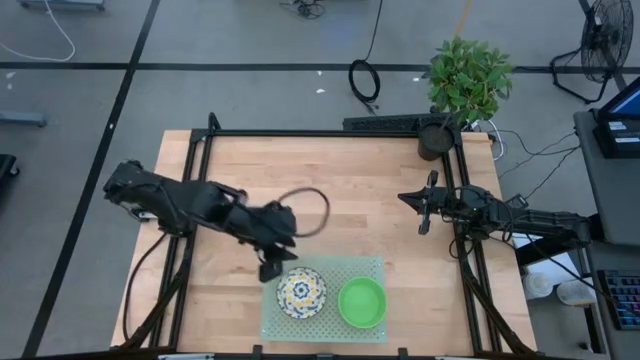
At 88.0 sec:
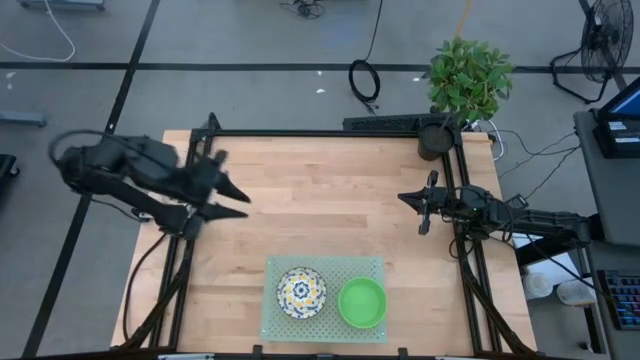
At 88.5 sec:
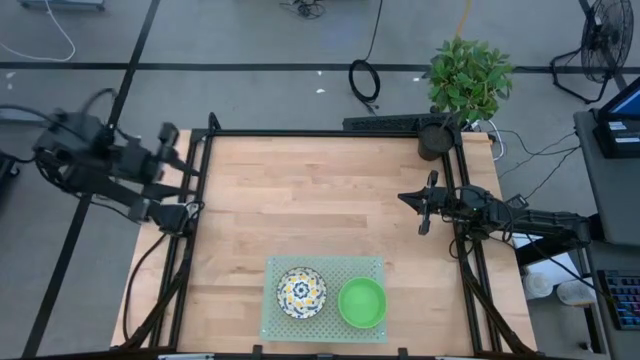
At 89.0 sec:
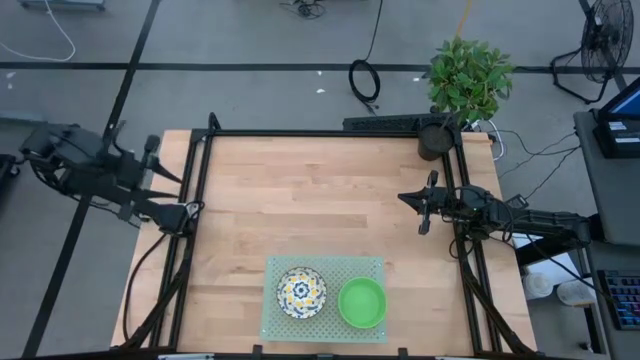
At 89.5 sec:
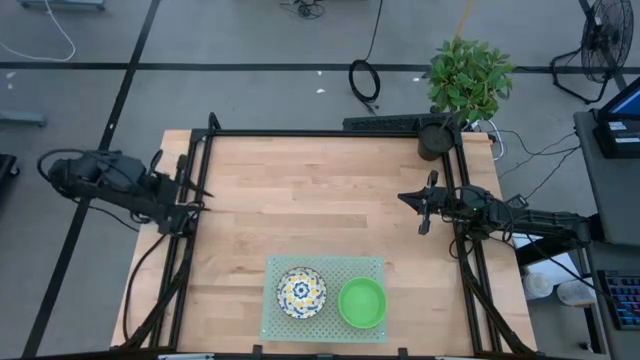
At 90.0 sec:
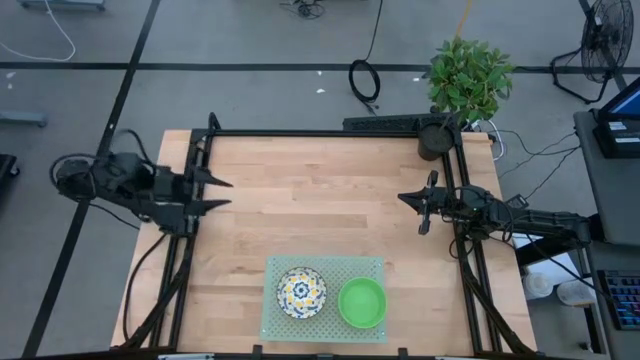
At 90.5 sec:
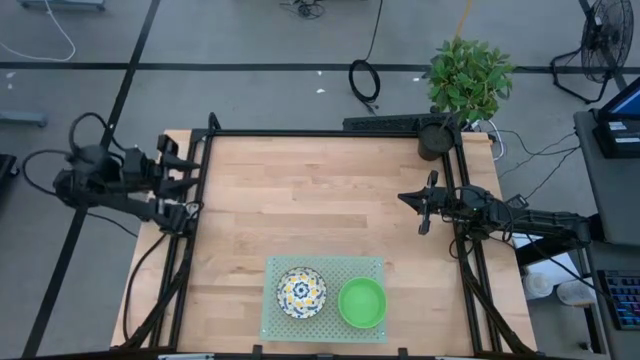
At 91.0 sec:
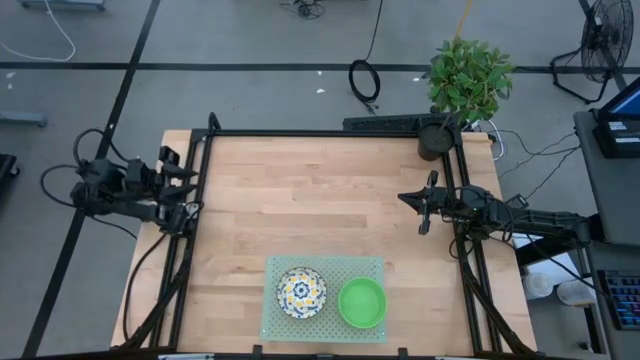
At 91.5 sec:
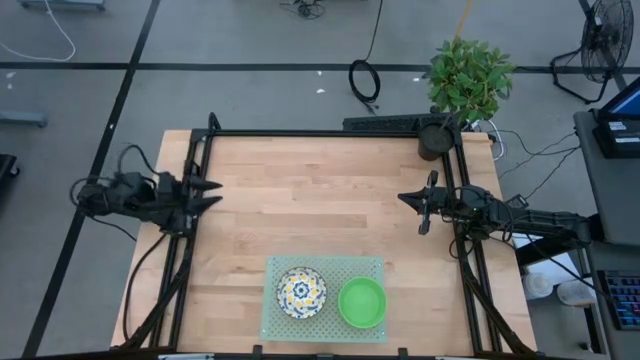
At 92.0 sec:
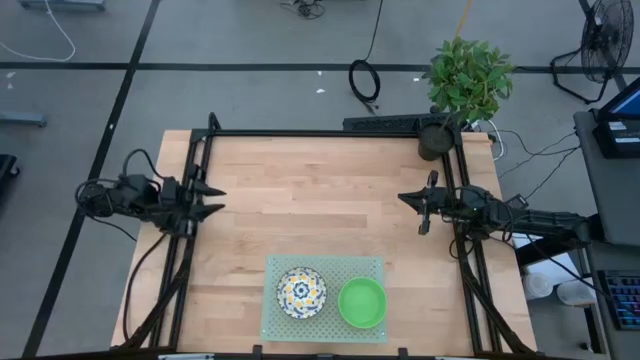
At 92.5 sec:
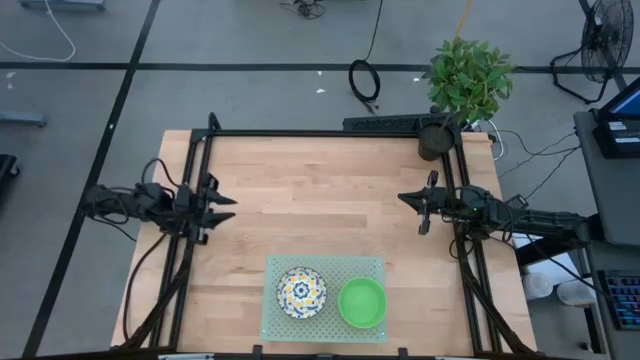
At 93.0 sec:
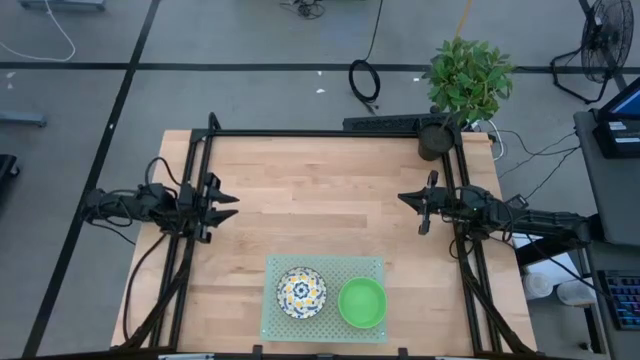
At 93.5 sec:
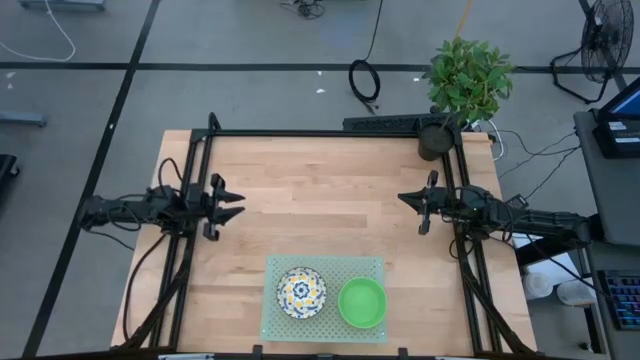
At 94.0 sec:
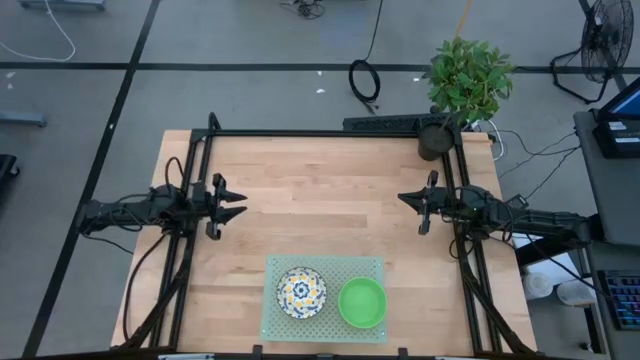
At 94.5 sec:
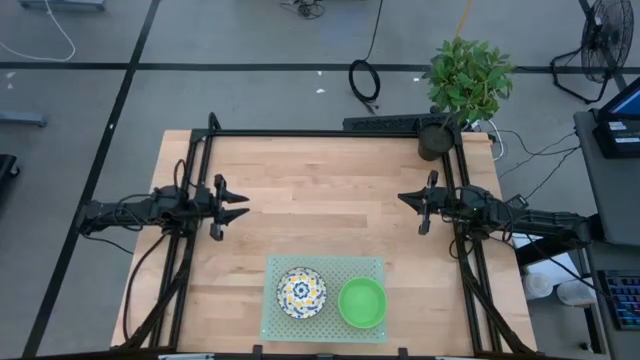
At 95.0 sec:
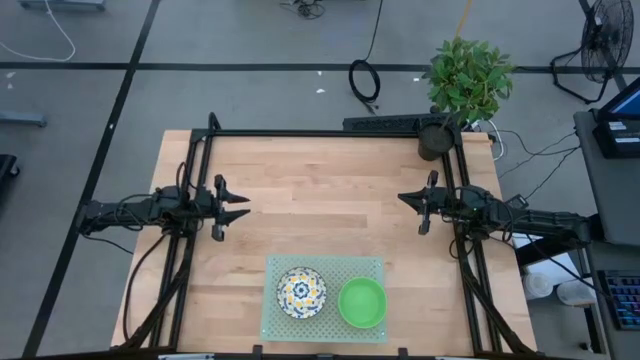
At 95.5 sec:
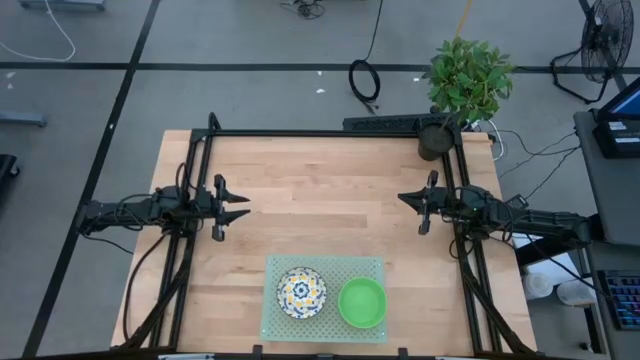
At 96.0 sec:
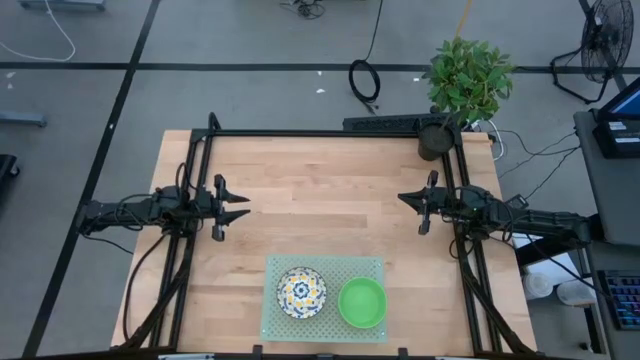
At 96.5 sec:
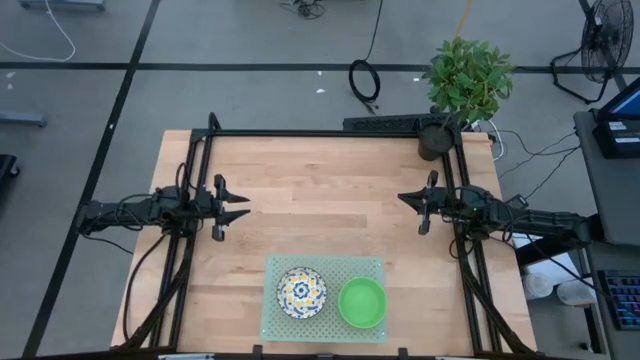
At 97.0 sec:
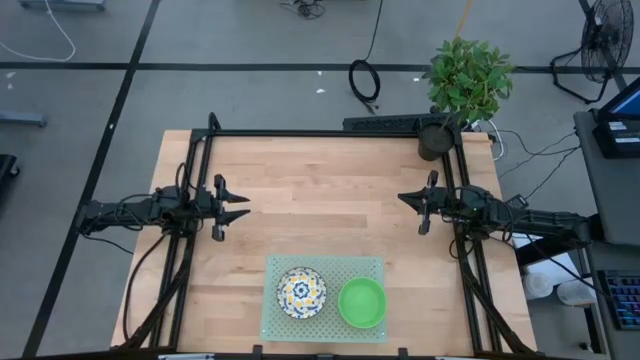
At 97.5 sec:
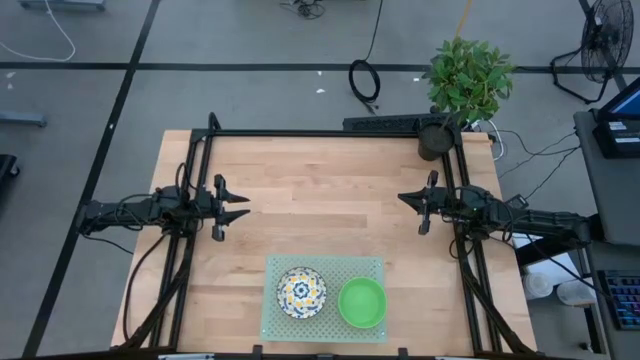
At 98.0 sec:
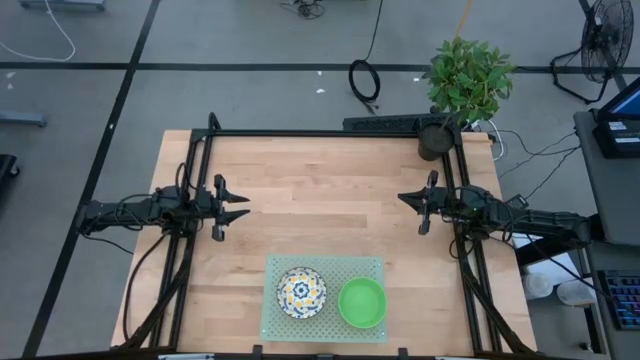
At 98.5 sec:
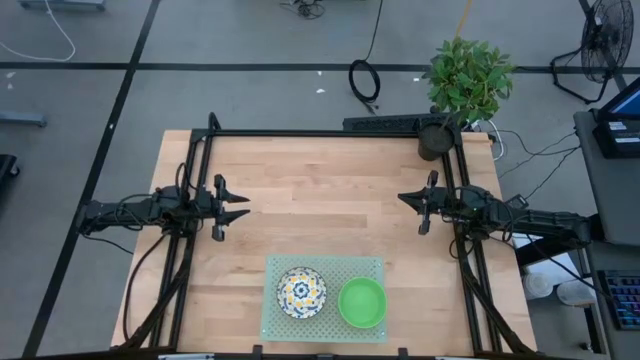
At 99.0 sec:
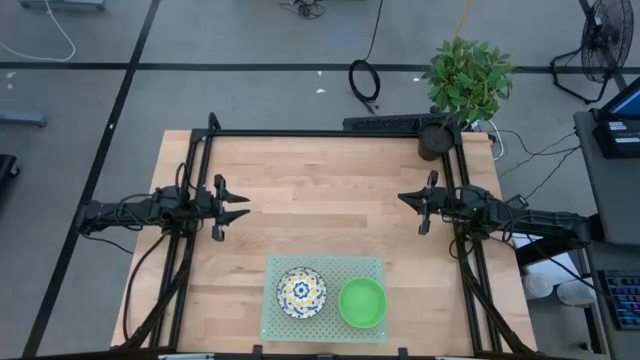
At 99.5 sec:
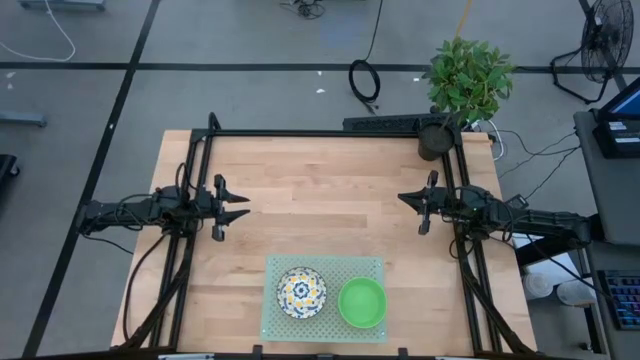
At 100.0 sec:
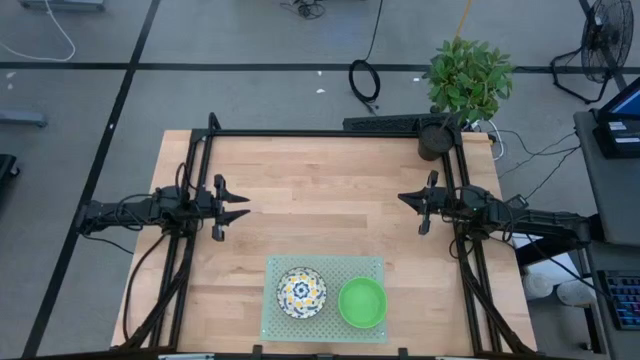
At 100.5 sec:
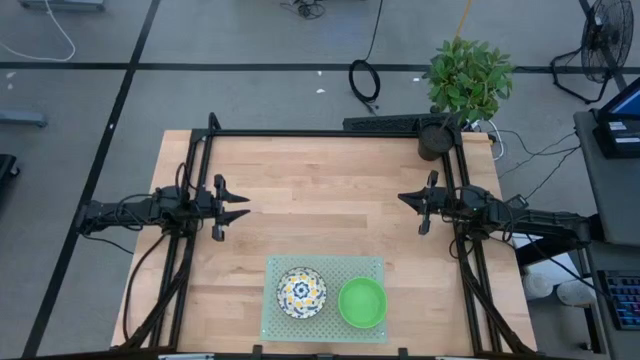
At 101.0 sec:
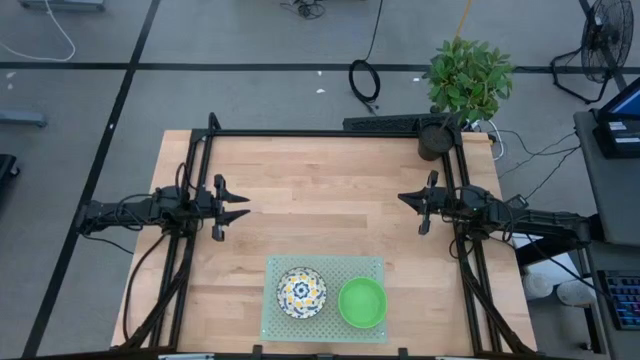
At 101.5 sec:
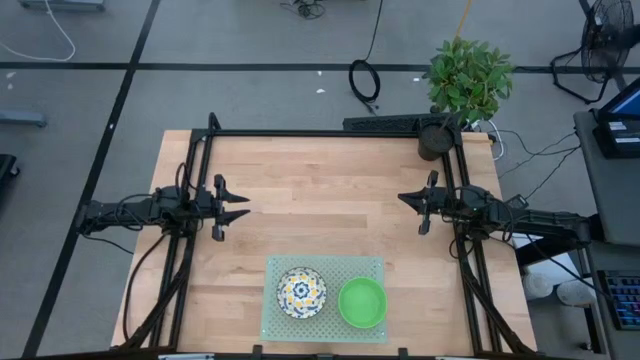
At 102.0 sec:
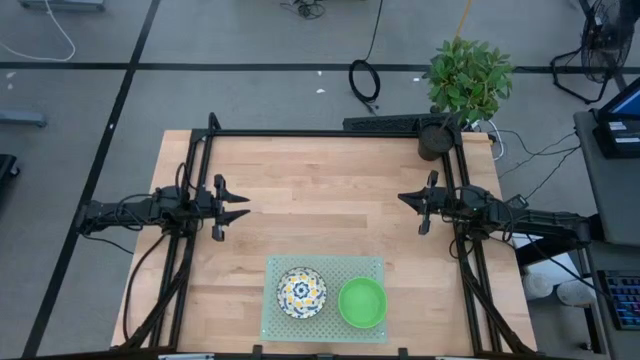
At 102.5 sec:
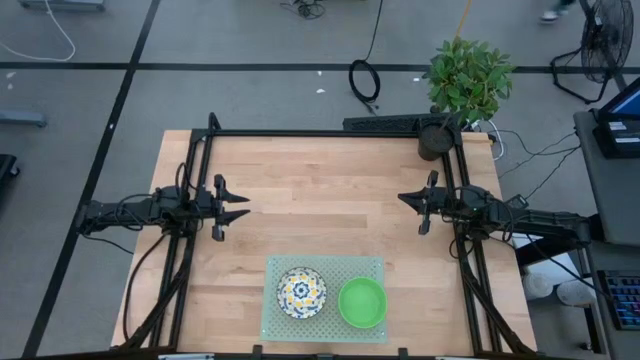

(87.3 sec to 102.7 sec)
Task: Pick & Place Mini bowls
Return to Home Position
